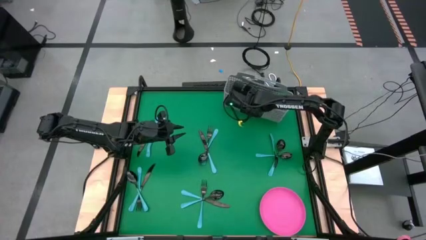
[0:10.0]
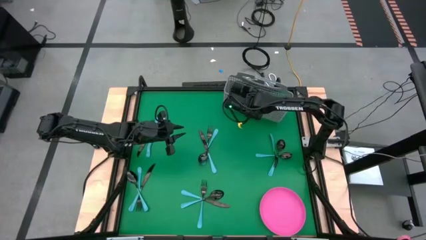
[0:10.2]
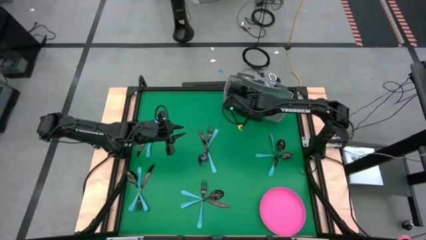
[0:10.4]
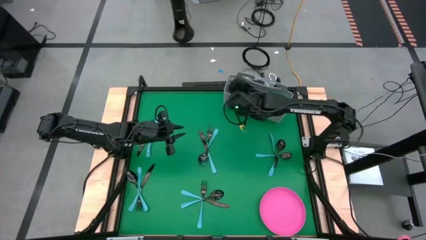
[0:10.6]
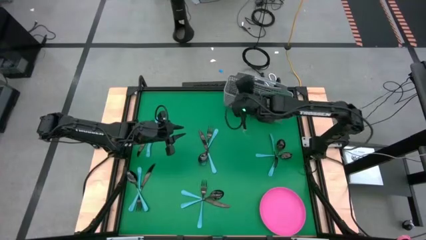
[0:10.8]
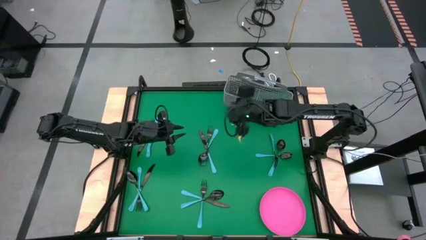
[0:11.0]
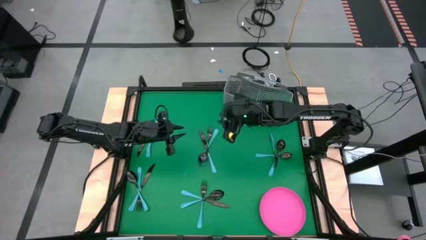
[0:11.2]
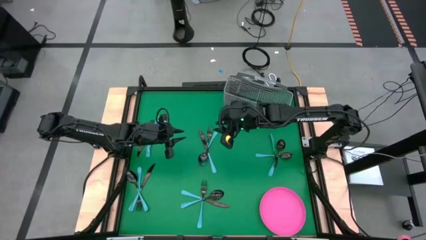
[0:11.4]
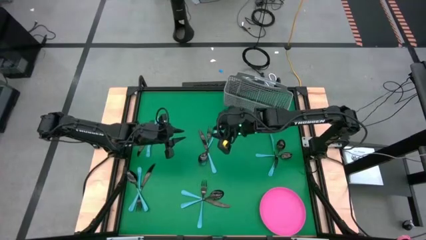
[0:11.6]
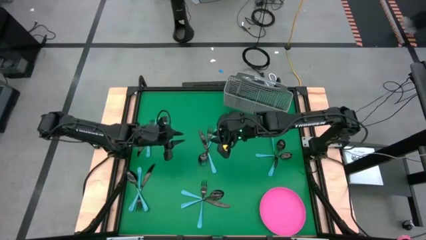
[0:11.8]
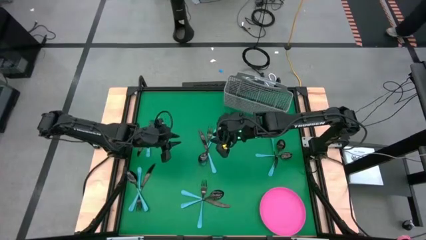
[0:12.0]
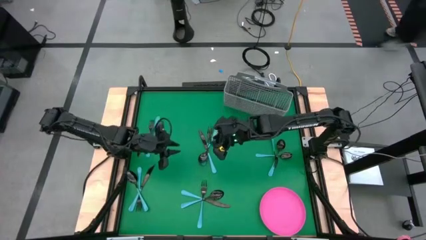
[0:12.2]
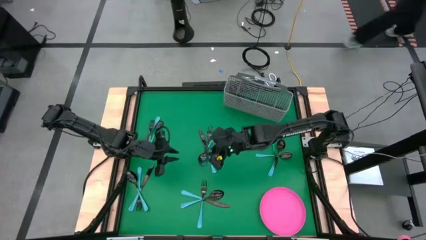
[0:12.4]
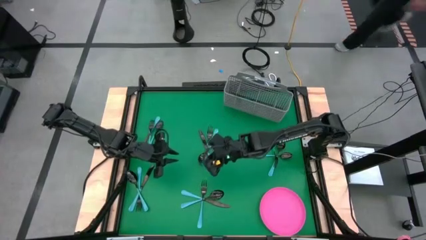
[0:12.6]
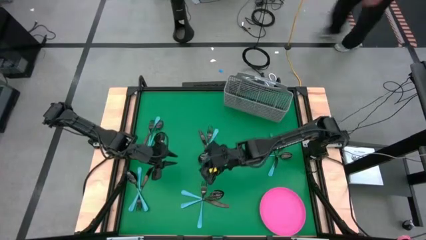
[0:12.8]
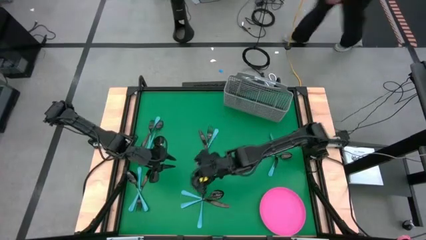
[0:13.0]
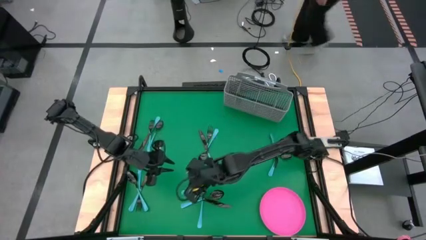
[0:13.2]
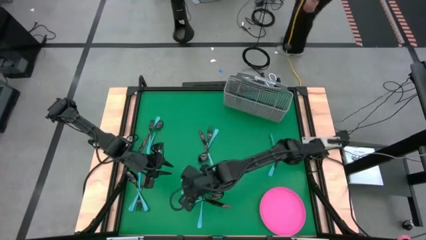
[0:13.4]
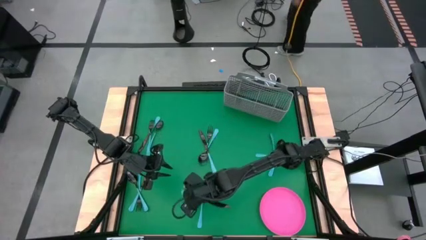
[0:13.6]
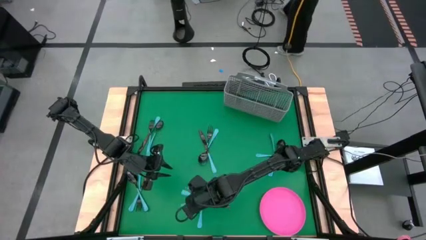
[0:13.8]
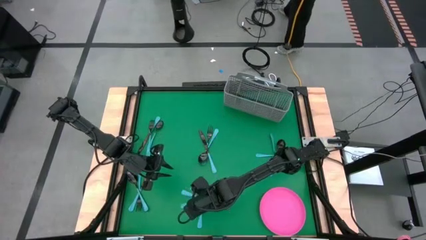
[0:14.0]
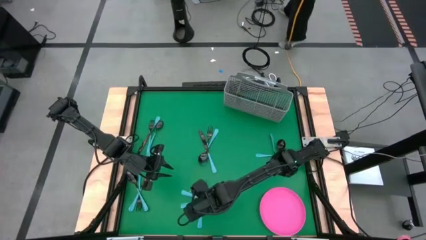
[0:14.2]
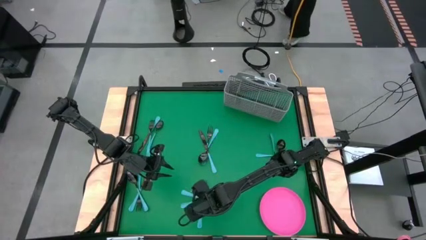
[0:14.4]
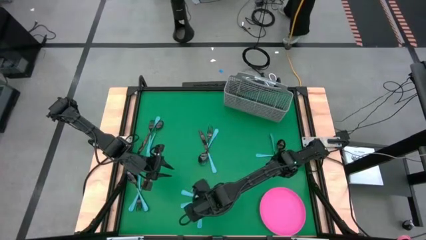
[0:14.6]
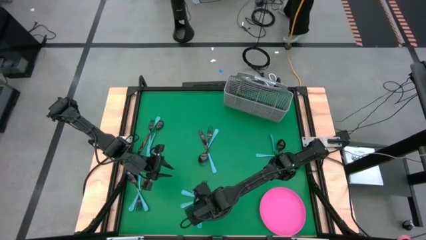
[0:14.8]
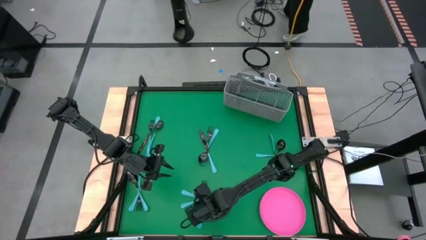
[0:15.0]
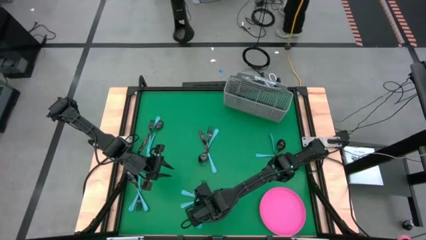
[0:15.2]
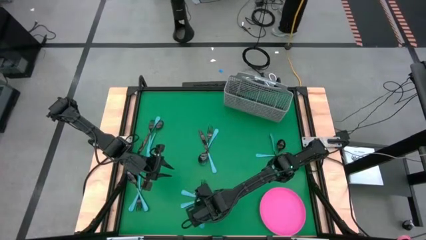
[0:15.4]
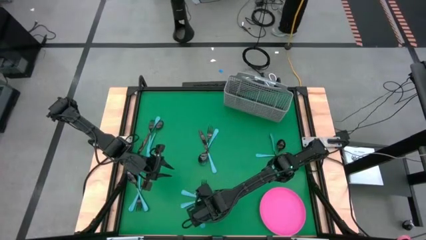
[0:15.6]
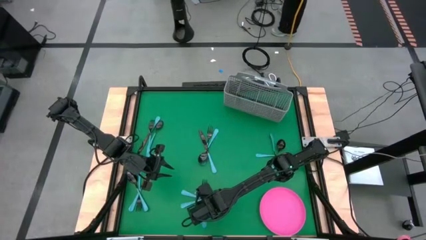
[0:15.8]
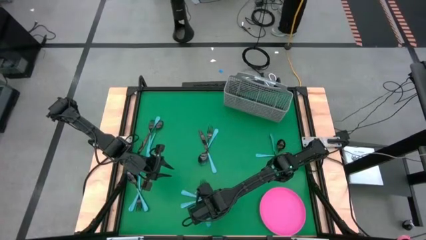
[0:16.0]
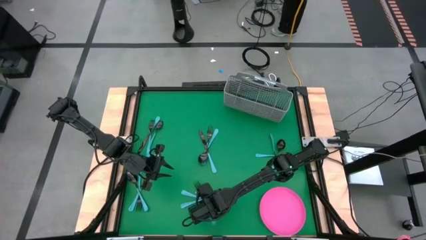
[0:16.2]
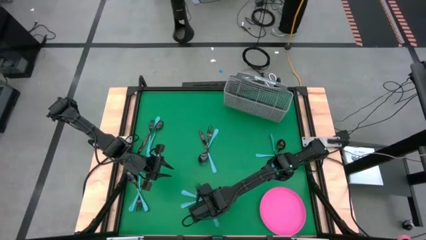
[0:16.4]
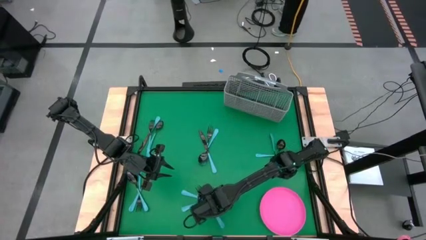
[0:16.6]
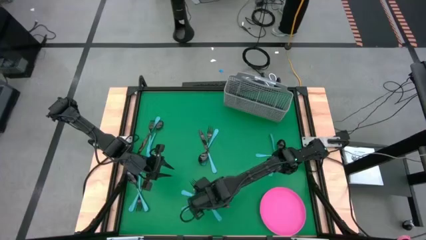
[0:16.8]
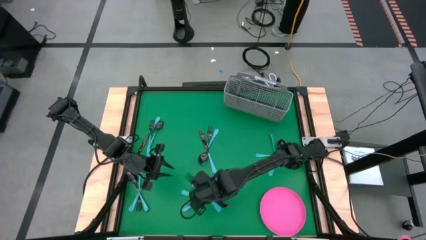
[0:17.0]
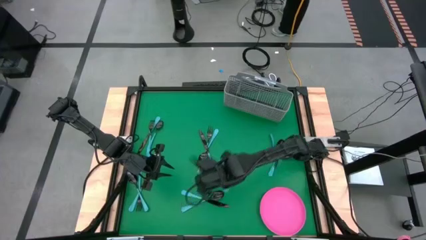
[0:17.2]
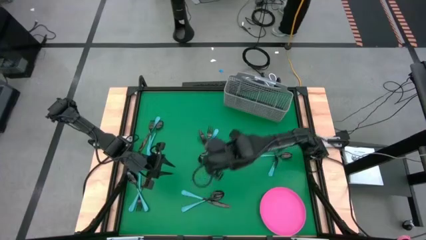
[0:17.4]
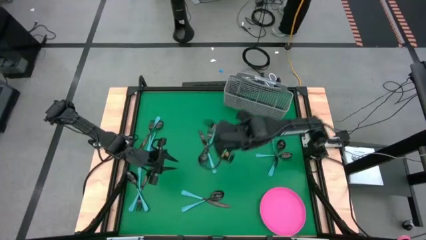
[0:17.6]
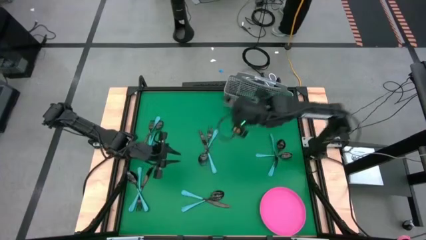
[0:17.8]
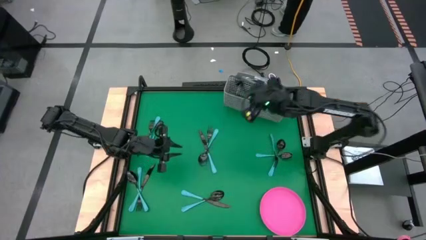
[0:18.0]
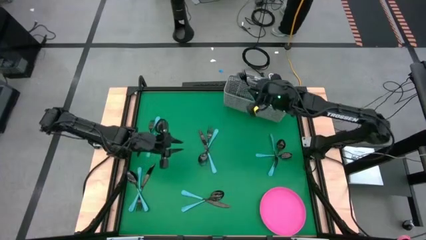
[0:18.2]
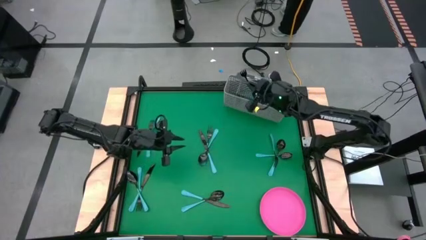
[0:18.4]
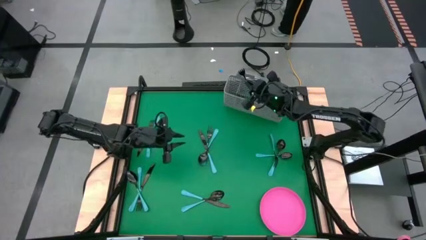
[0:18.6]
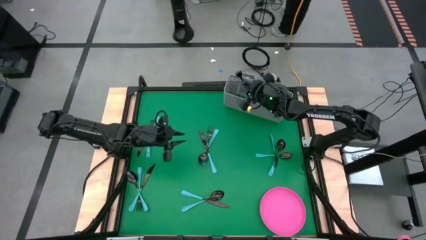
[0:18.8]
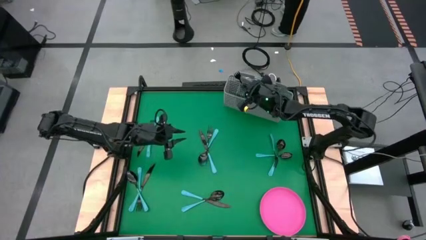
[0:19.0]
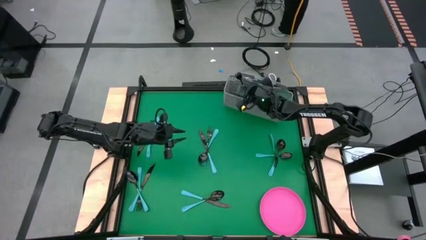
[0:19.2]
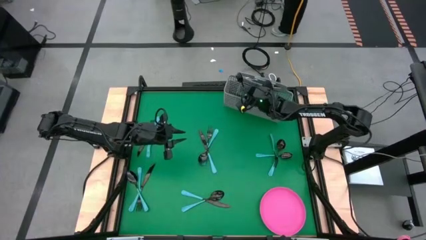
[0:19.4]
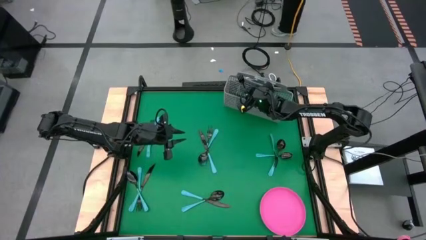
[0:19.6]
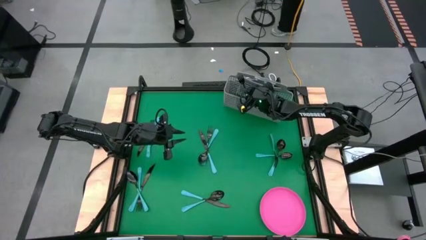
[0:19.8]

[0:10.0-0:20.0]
Task: Sort silverware
Put the blue fork into the silverware basket

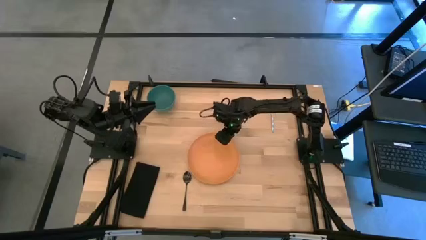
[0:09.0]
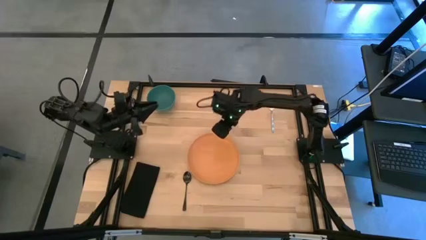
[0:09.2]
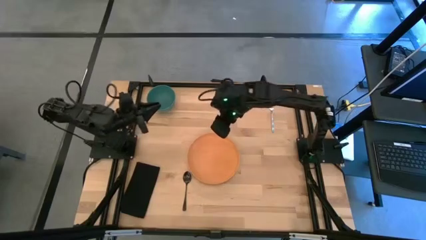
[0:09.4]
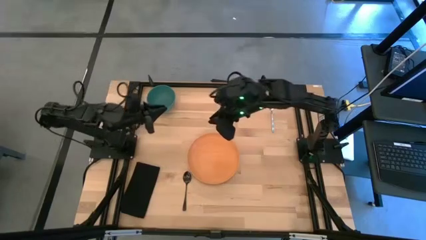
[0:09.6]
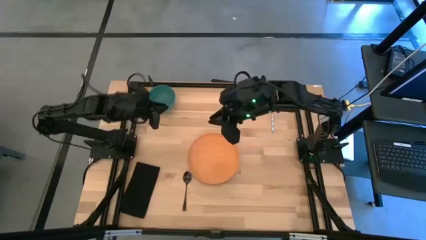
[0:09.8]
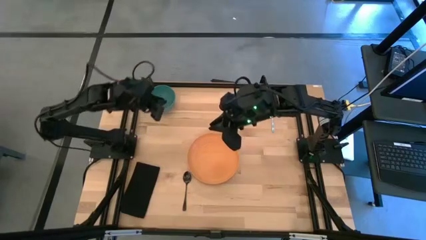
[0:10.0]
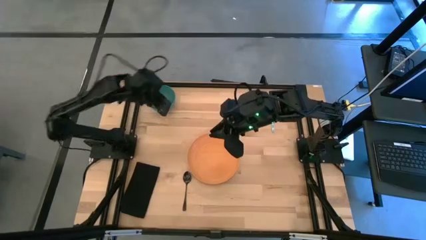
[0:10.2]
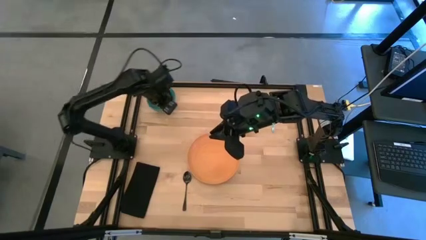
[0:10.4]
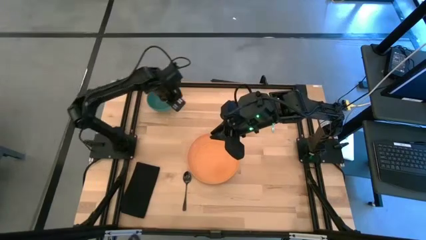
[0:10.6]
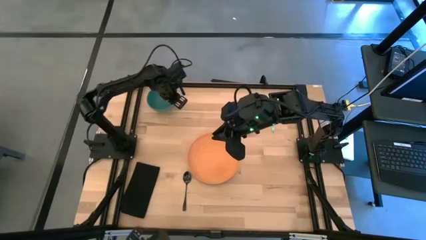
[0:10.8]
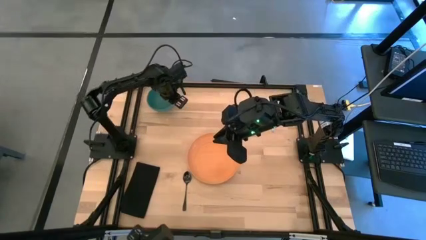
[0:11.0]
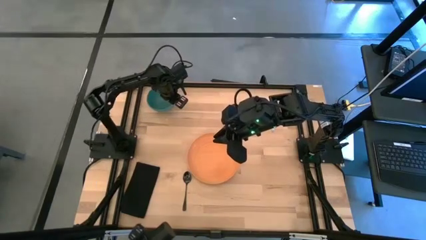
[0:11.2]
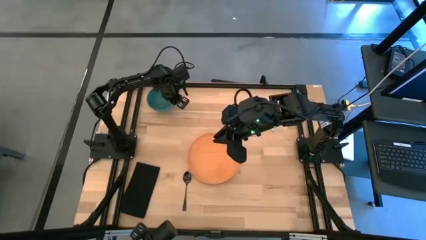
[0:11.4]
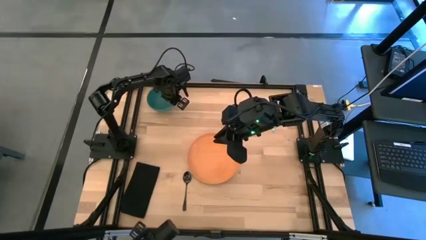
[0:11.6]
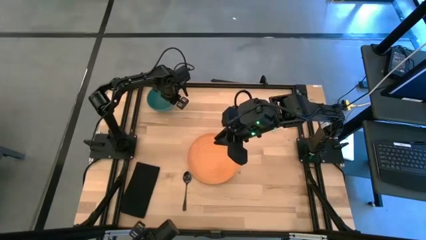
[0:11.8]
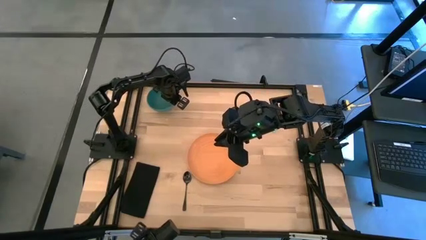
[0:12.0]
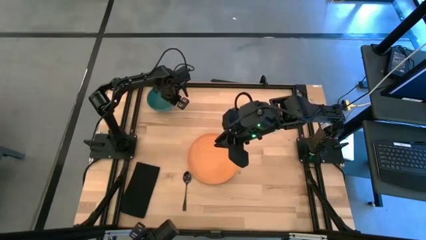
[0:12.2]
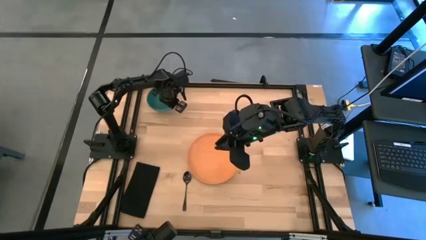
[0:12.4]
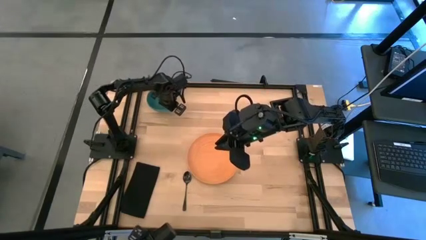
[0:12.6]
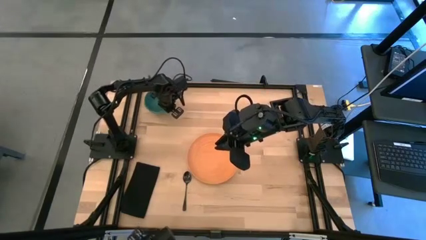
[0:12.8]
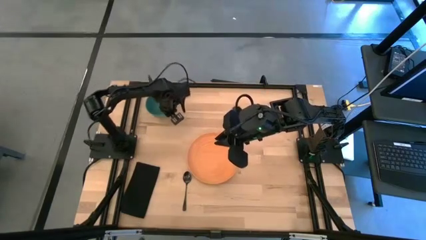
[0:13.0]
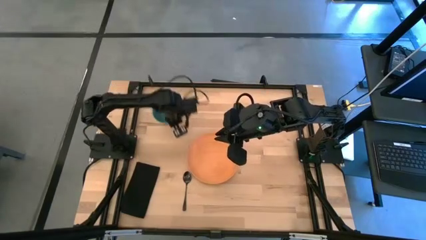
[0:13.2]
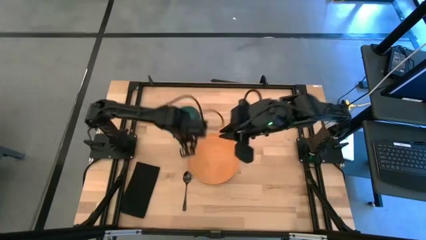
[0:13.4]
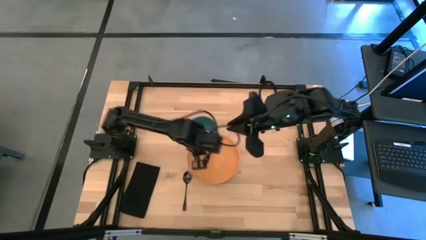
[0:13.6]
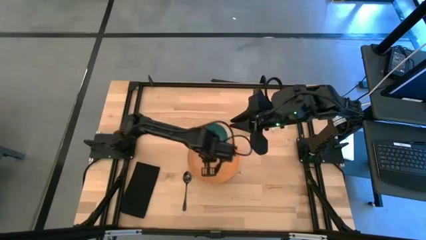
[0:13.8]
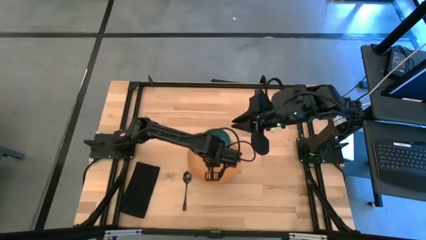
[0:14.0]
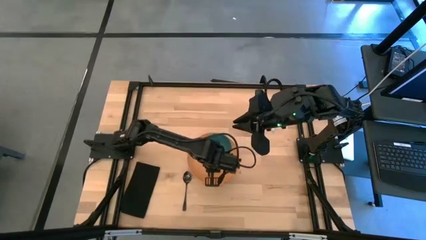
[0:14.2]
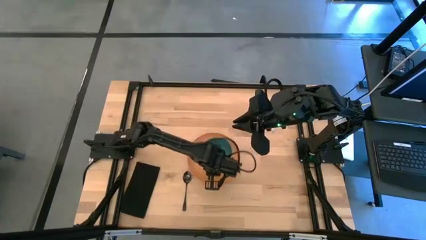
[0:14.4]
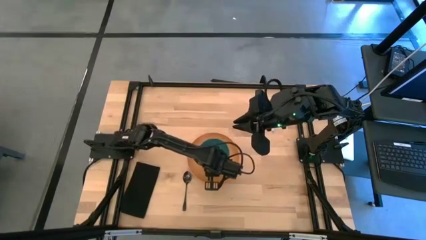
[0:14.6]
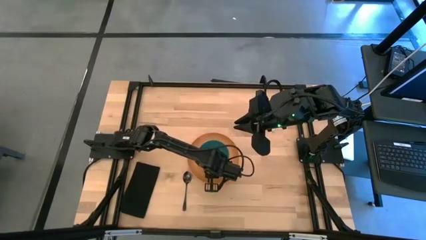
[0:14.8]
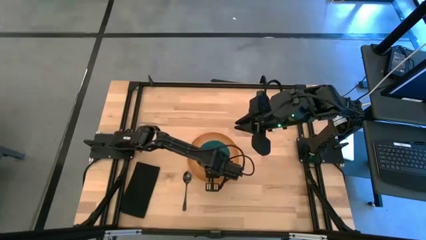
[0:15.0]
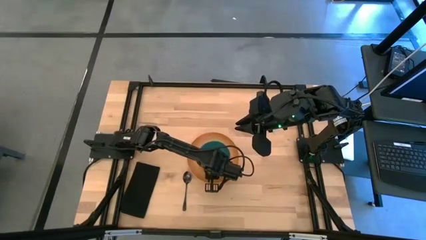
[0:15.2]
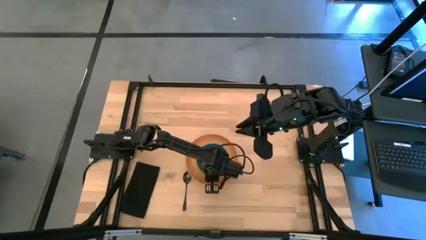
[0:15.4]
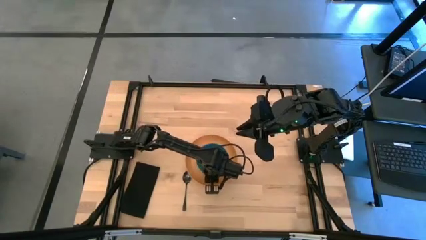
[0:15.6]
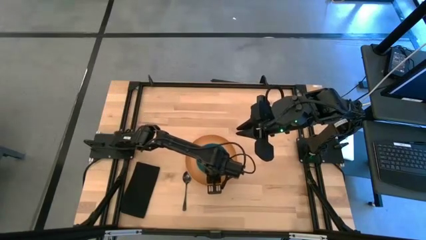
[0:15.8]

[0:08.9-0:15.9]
Task: Set table place
Put the blue bowl on the orange plate
